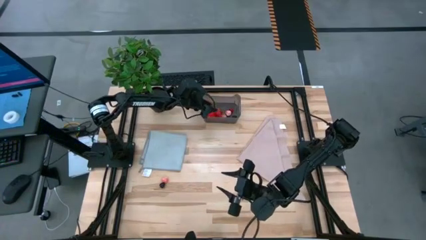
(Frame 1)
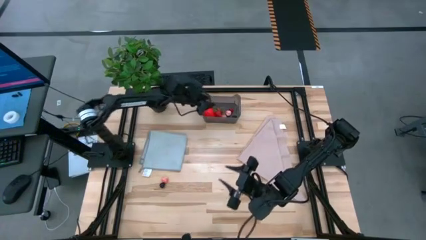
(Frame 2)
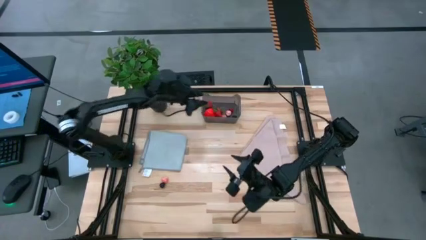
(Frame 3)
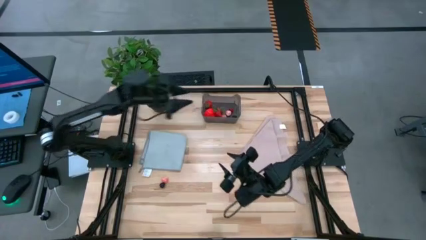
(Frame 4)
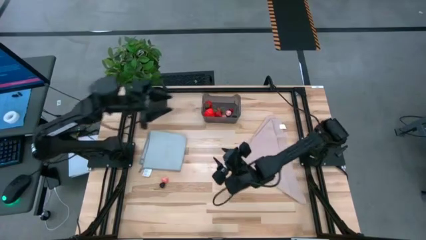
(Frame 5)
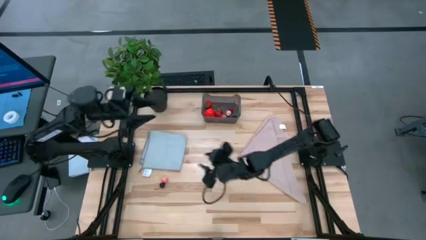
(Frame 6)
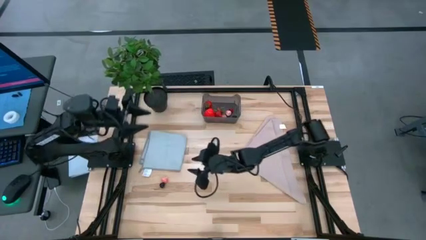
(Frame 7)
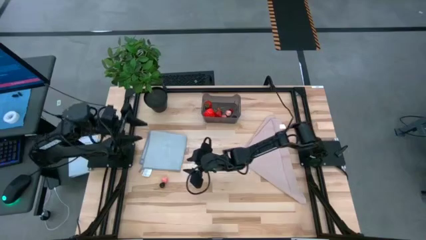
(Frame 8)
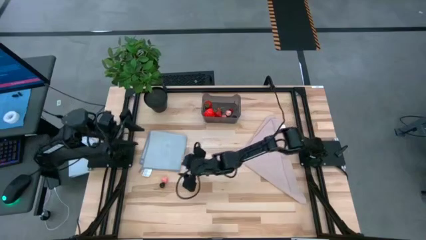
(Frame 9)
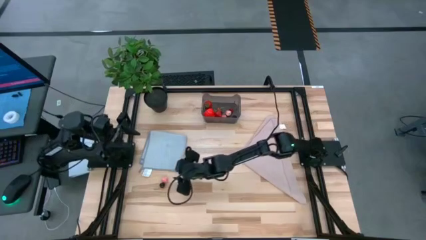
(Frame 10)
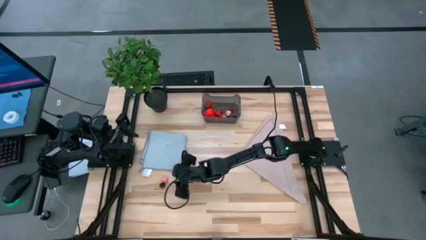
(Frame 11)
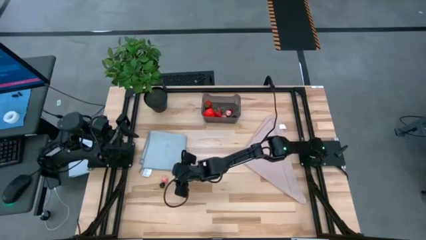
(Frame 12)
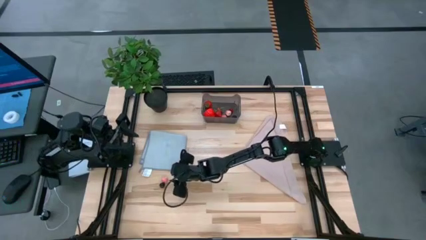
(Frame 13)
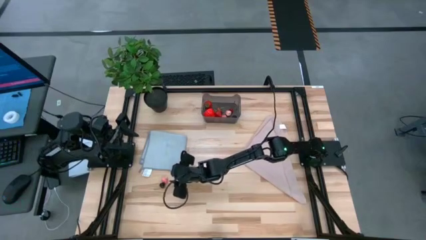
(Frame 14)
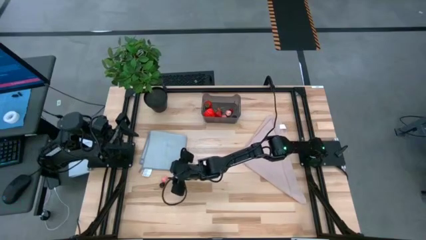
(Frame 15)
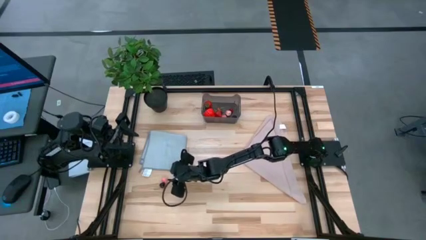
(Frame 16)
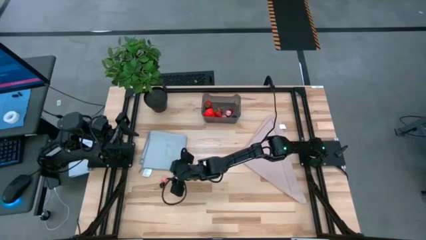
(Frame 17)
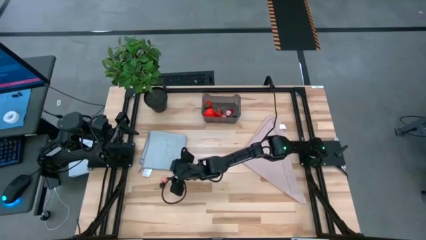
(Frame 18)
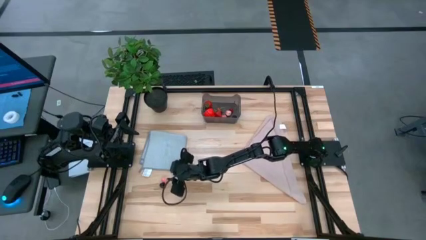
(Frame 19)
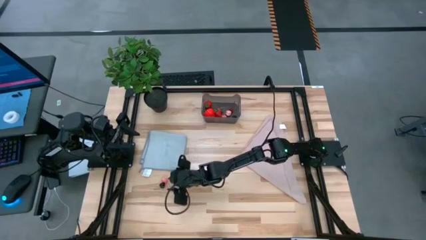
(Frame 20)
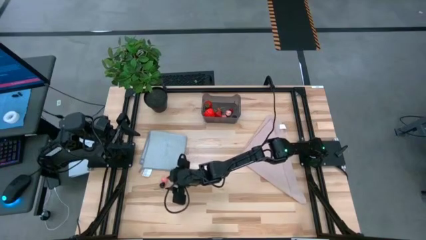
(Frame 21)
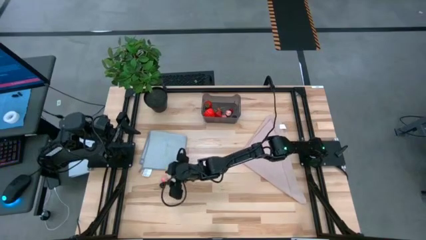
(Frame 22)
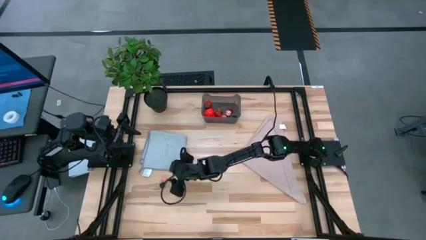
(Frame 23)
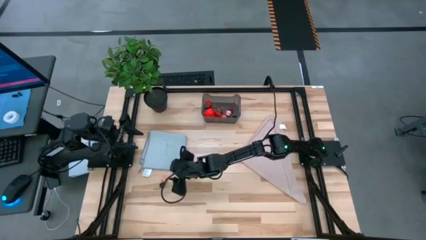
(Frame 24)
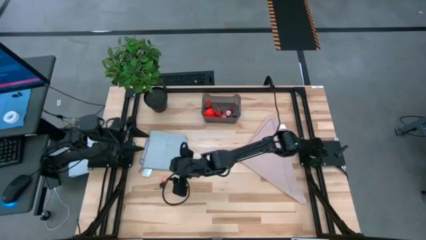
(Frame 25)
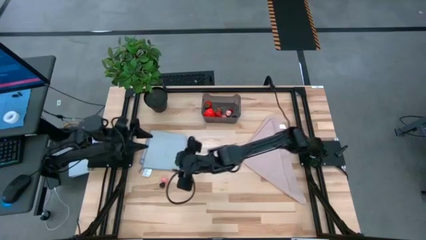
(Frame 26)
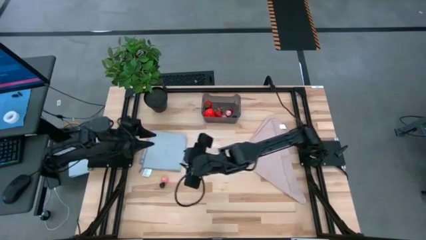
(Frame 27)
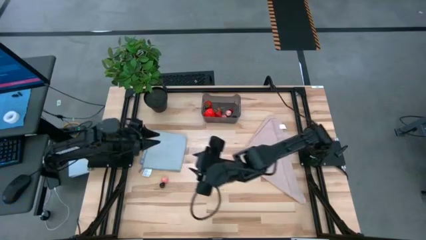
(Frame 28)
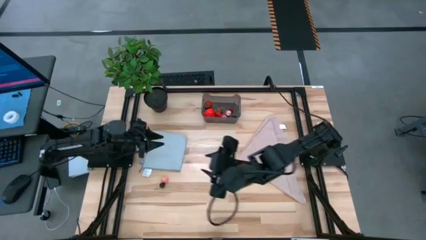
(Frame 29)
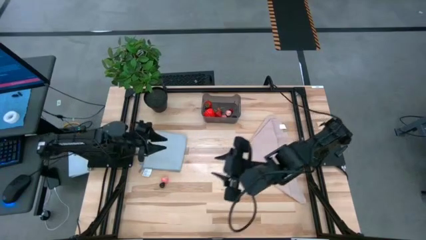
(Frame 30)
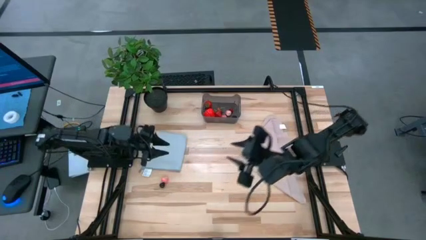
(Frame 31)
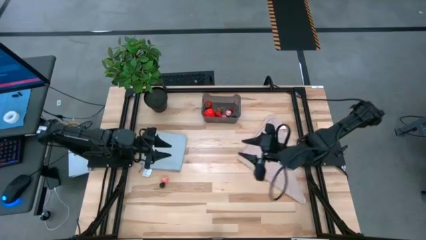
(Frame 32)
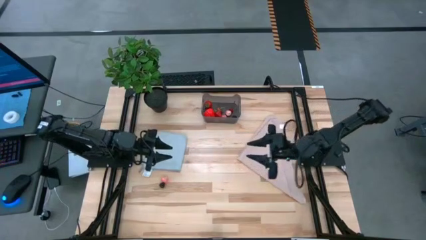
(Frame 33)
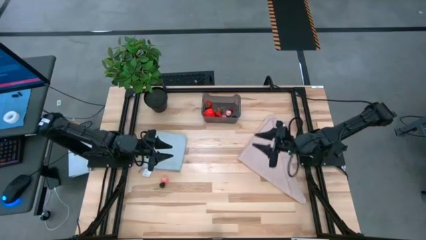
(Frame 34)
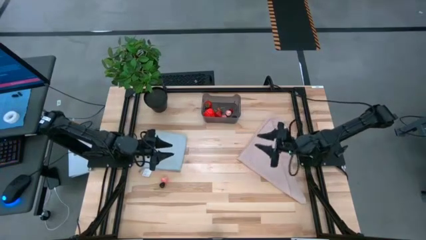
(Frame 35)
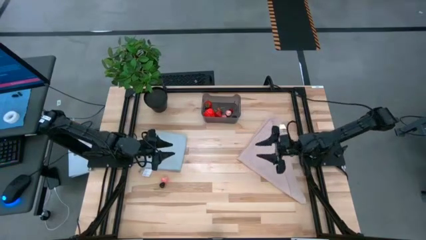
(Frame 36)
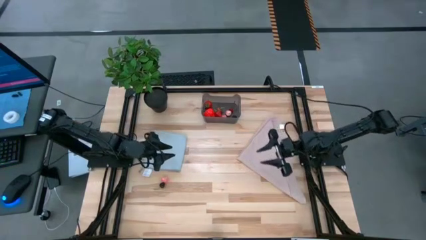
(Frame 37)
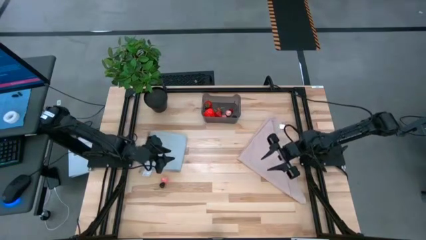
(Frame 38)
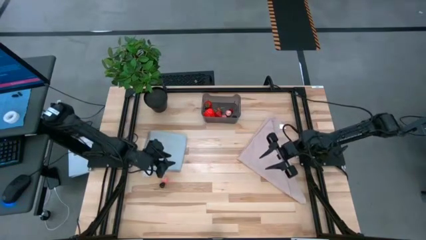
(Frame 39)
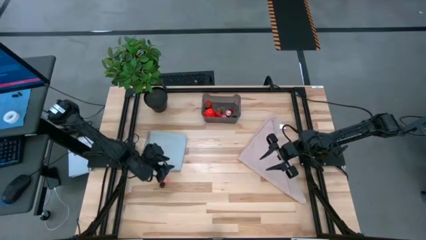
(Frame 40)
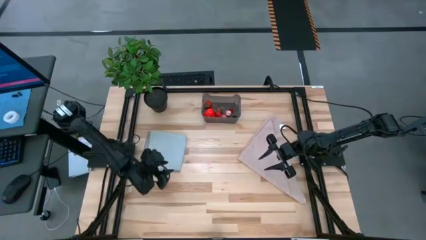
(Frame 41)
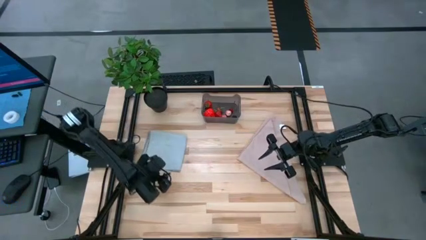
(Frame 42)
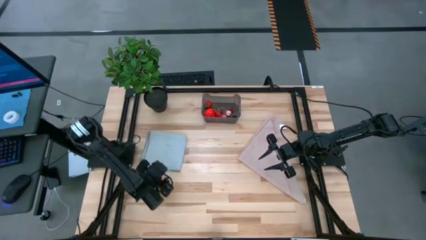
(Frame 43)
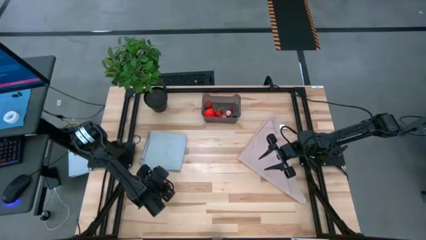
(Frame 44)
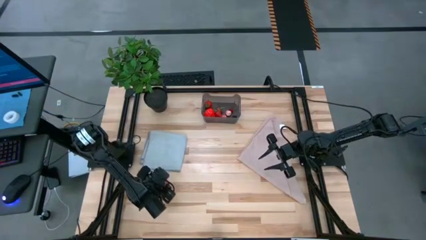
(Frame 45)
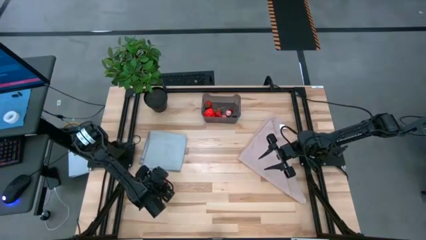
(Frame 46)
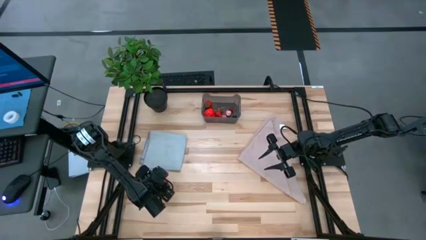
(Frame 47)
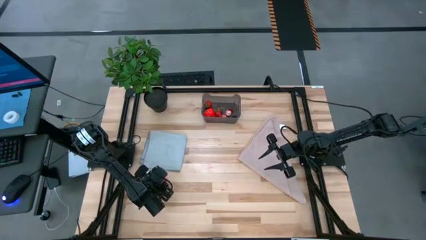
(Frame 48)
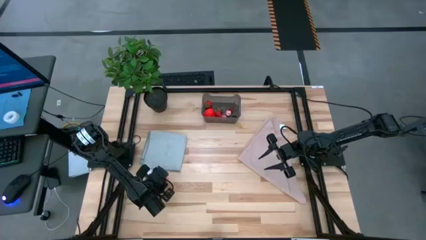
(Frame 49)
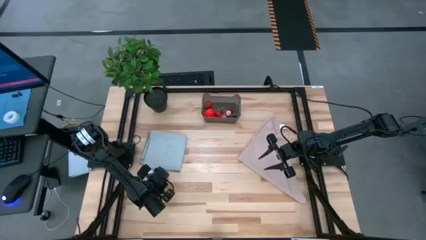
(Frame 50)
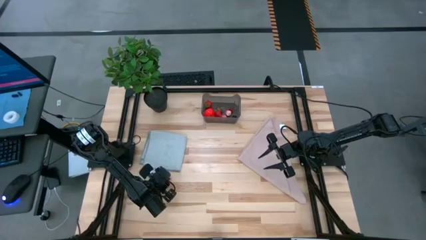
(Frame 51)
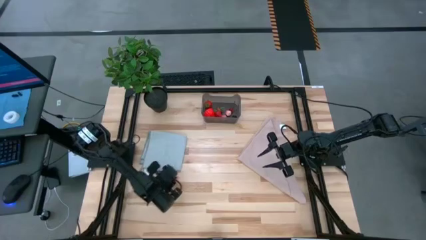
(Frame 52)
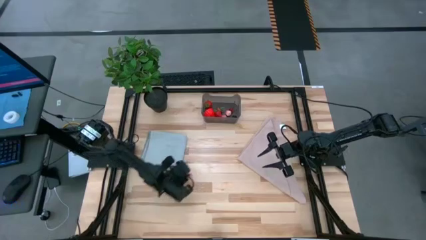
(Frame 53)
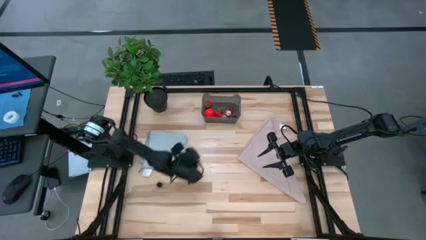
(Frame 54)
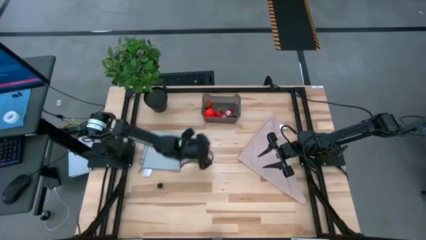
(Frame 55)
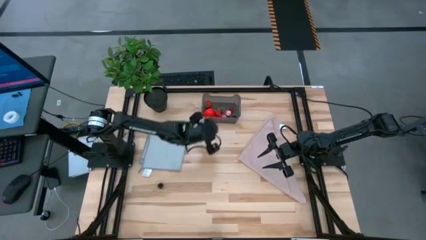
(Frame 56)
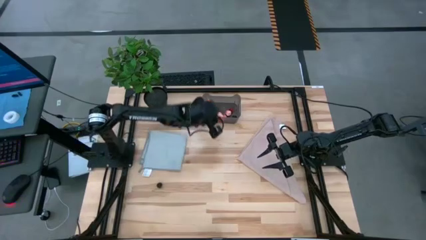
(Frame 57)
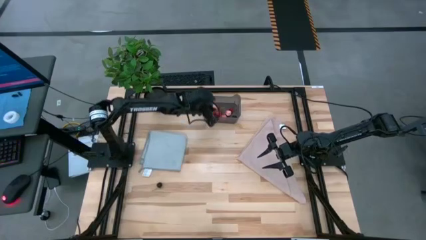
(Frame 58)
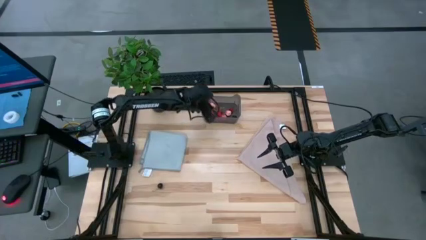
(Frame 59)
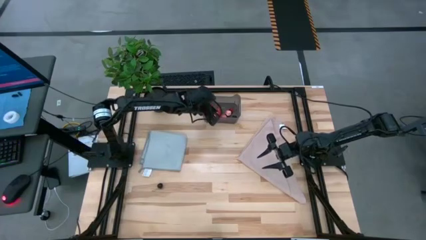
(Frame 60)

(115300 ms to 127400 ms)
Task: Pick and placing Produce into tupperware
Put the peach into the black bin

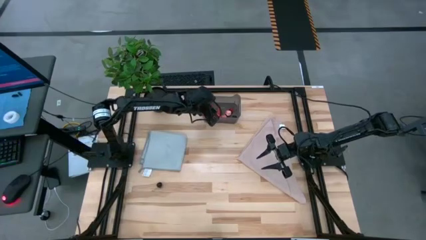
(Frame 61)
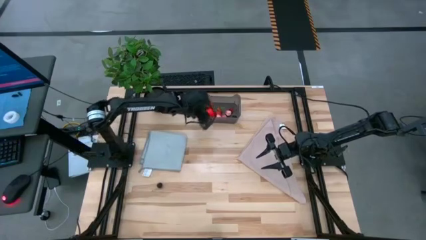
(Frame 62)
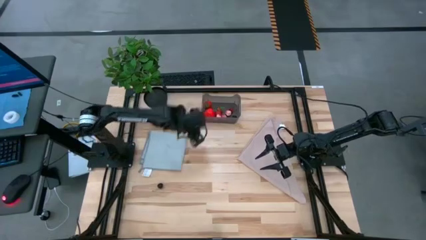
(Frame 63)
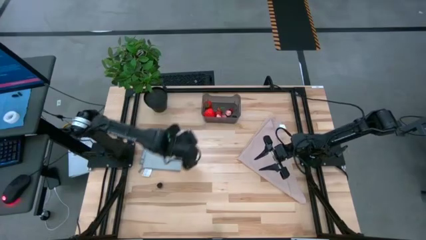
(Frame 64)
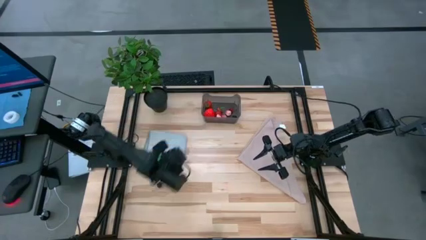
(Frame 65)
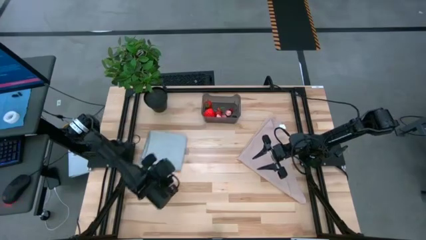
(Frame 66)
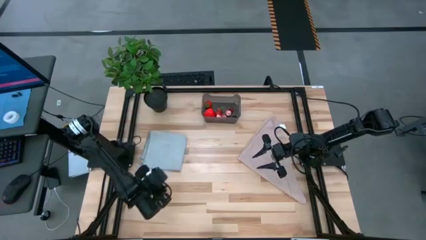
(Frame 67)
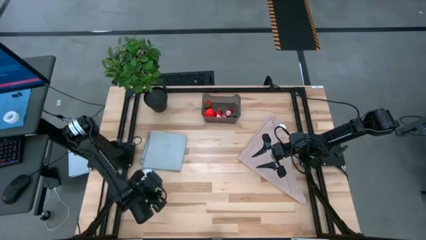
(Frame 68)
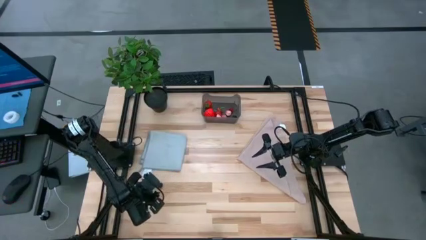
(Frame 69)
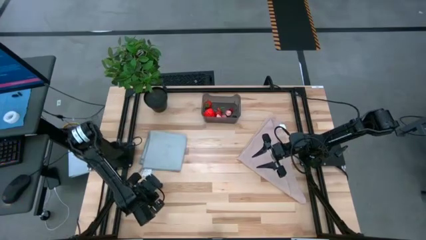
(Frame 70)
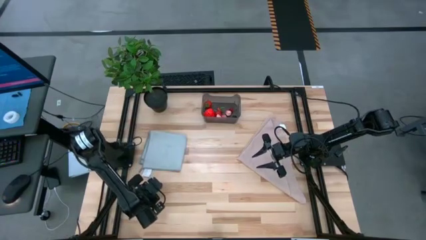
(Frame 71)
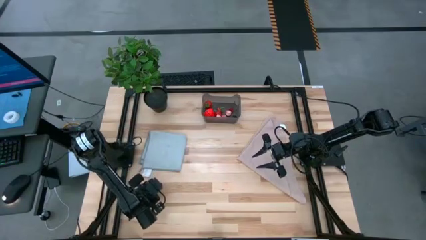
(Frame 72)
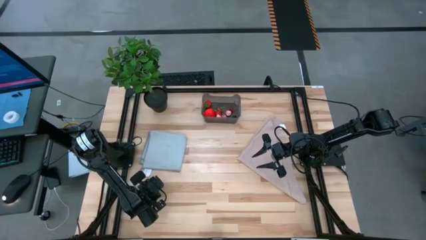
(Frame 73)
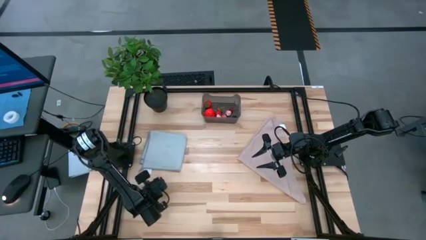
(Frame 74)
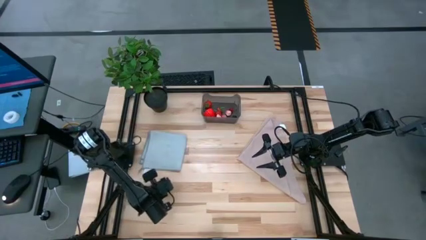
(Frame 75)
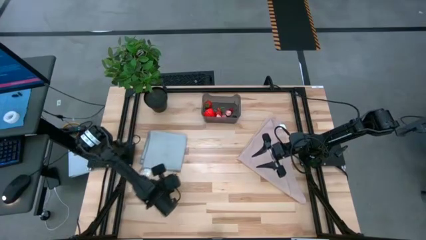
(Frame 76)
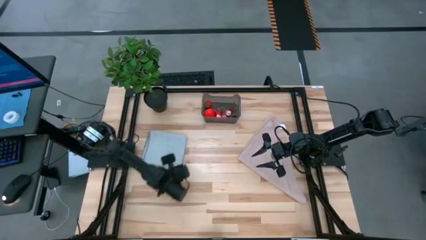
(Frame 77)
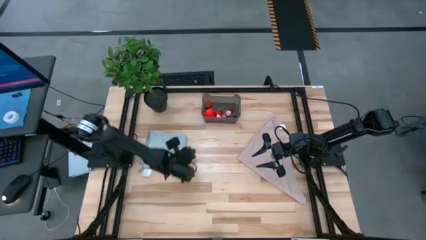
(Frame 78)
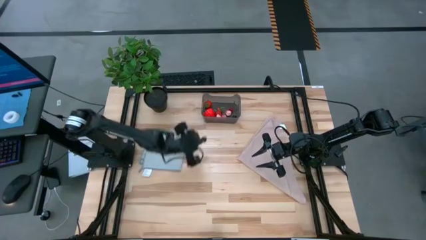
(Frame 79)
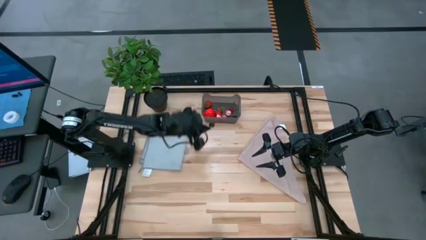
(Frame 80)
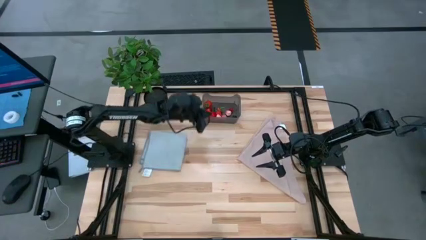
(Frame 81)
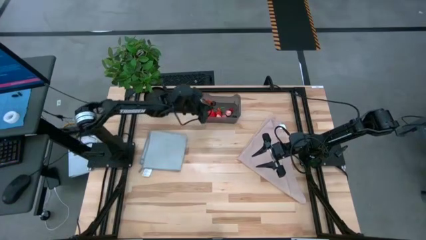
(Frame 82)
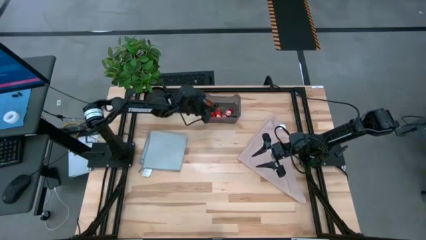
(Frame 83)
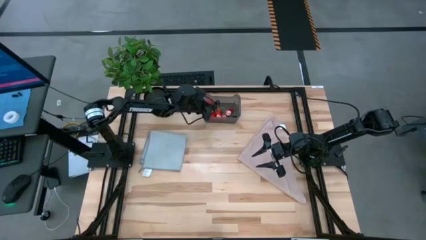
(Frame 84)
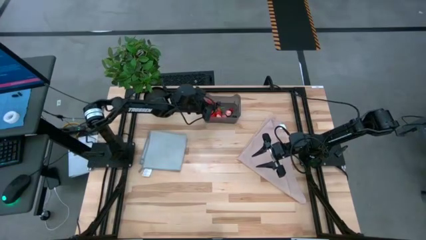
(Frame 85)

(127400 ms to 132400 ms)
Put the black cherry into the black bin
